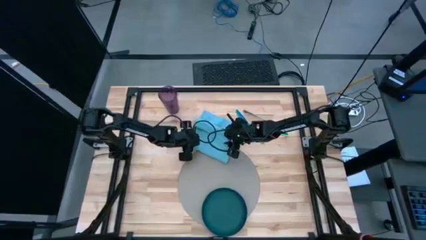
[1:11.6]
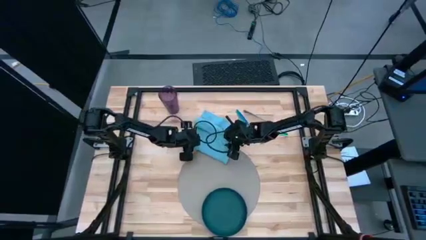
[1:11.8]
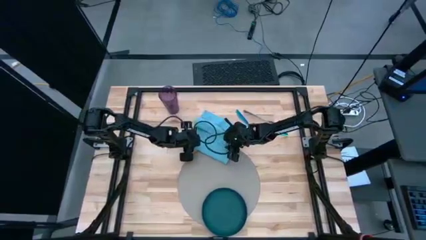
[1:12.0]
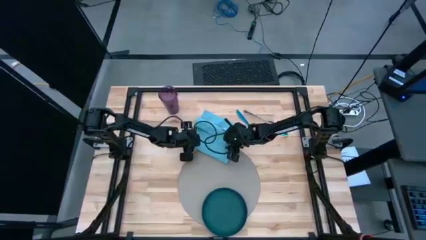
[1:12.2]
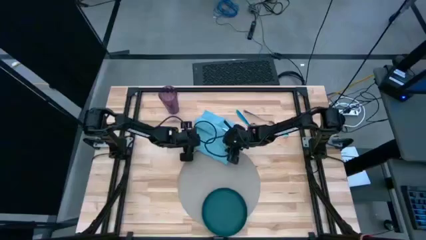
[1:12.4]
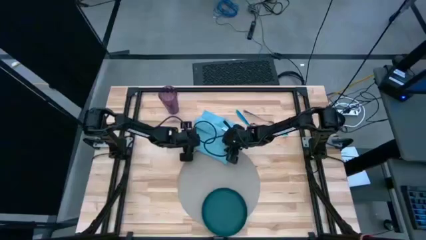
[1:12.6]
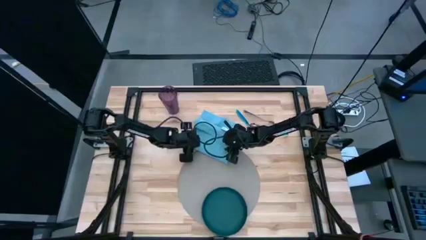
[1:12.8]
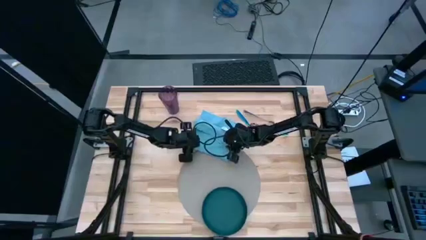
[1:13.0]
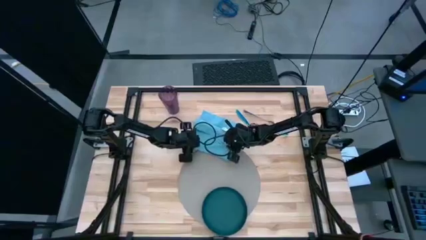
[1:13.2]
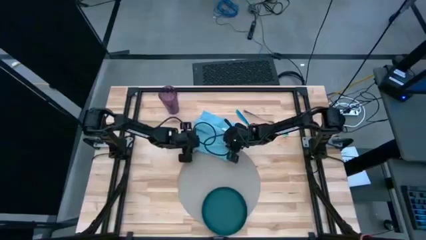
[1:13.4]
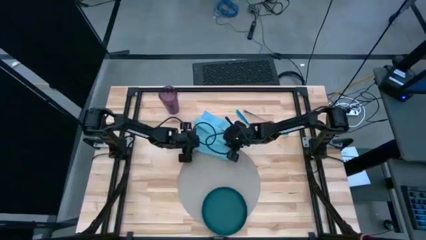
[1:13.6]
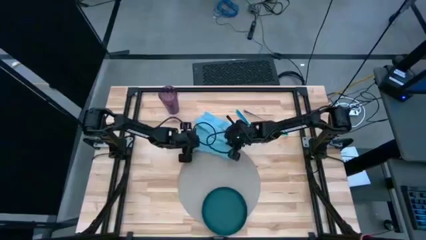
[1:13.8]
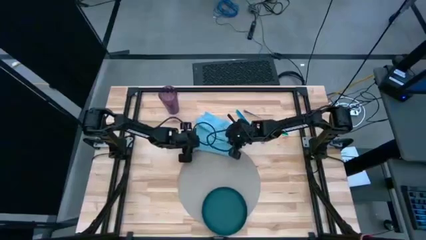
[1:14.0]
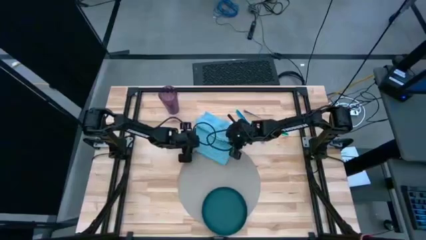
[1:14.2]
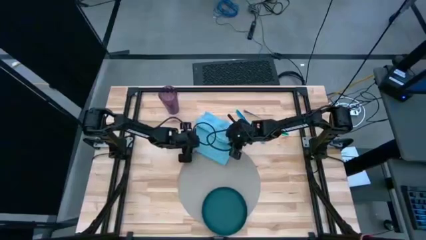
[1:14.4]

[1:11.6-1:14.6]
Task: Set table place
Fold the blue table napkin

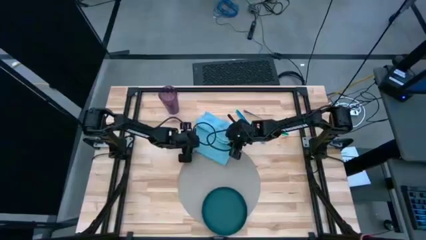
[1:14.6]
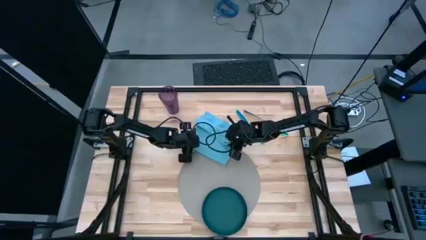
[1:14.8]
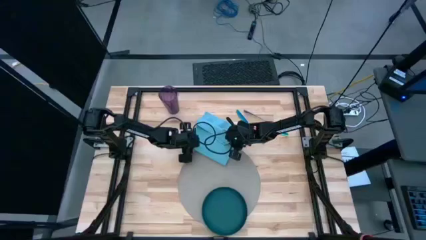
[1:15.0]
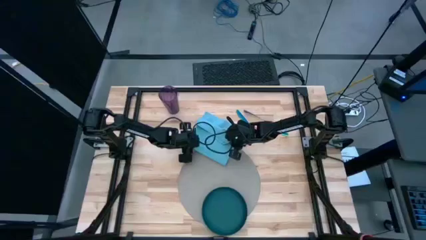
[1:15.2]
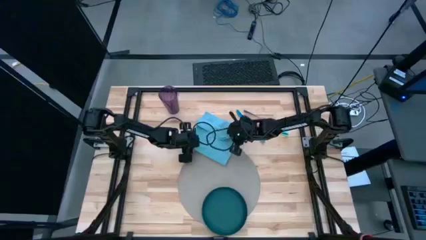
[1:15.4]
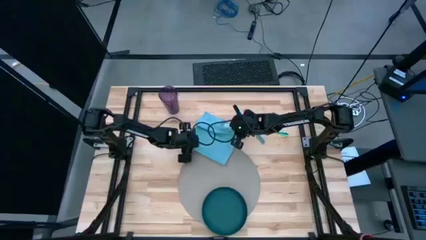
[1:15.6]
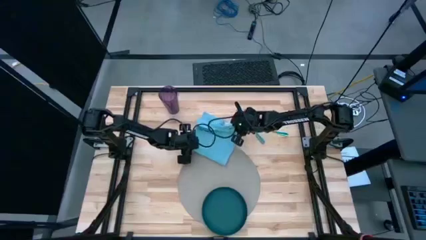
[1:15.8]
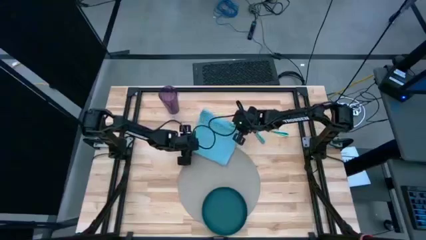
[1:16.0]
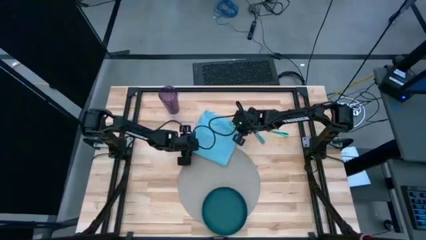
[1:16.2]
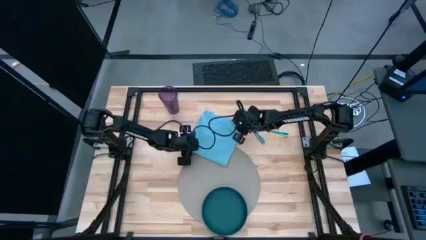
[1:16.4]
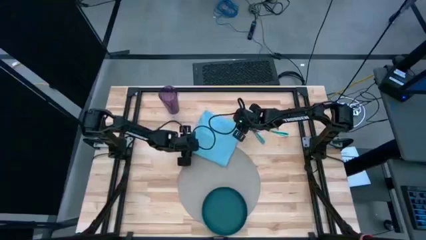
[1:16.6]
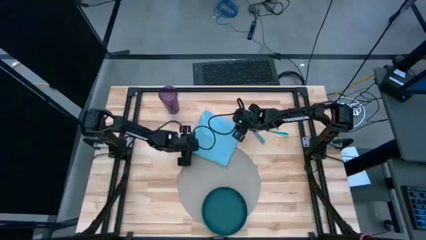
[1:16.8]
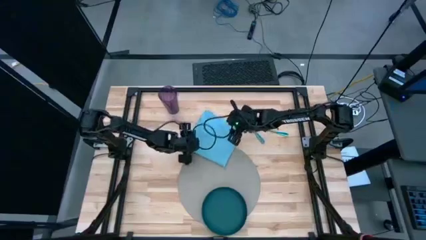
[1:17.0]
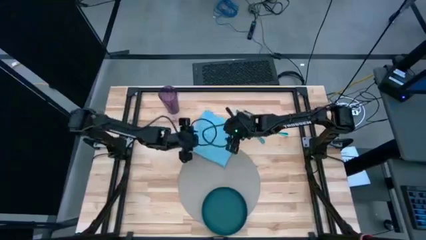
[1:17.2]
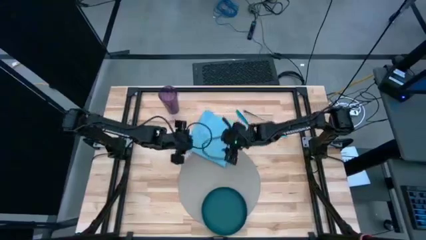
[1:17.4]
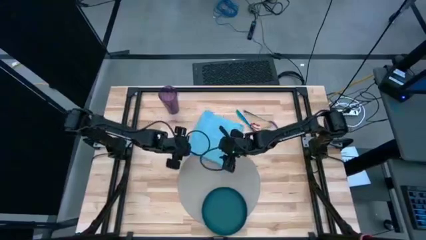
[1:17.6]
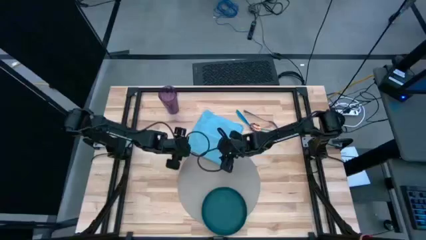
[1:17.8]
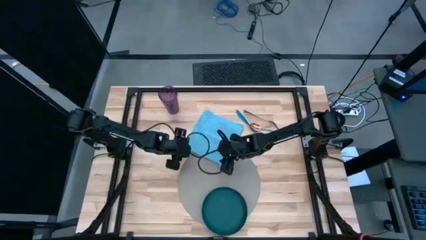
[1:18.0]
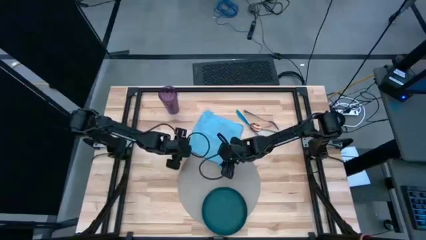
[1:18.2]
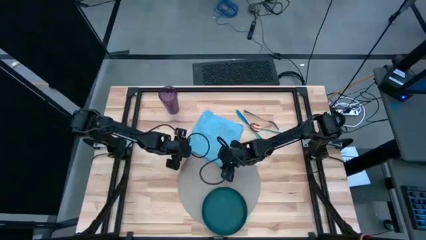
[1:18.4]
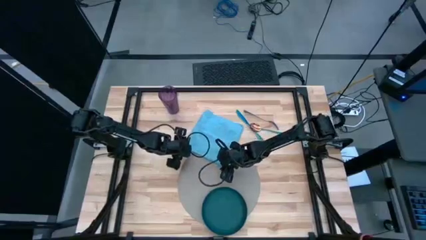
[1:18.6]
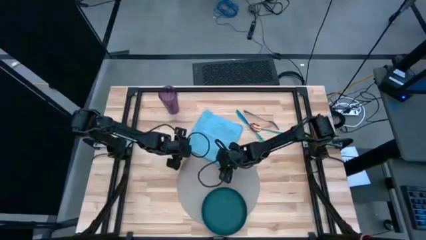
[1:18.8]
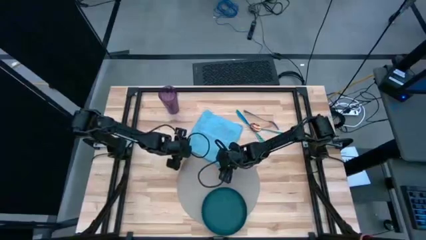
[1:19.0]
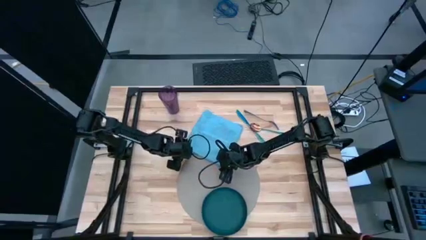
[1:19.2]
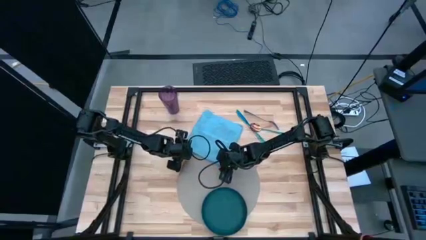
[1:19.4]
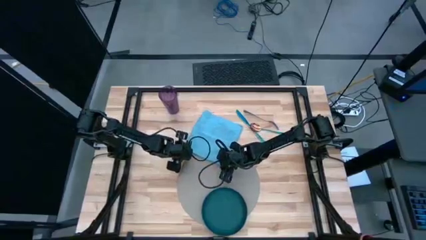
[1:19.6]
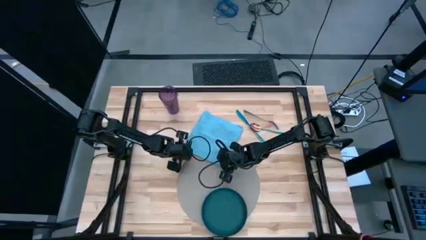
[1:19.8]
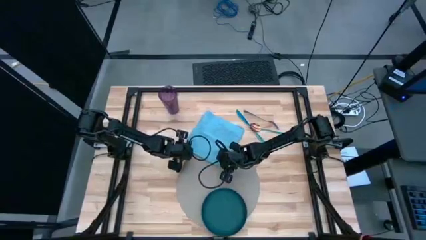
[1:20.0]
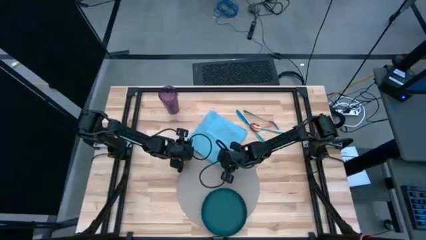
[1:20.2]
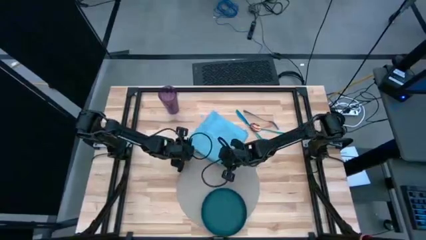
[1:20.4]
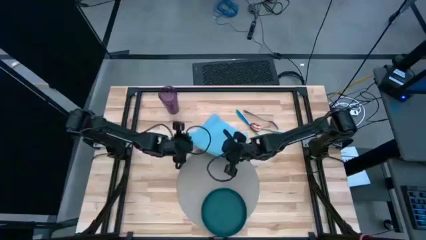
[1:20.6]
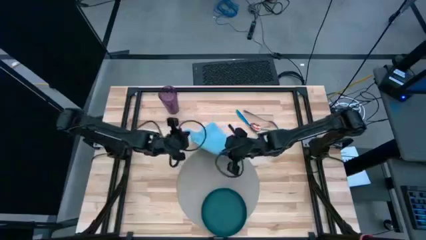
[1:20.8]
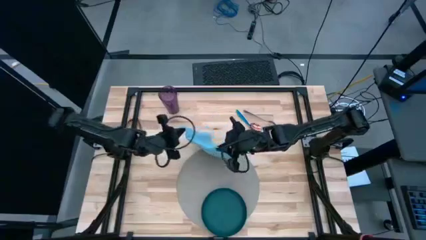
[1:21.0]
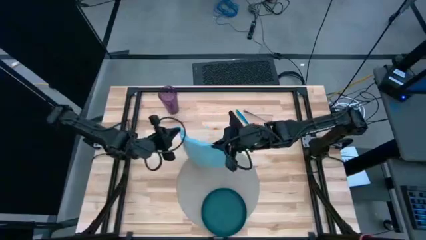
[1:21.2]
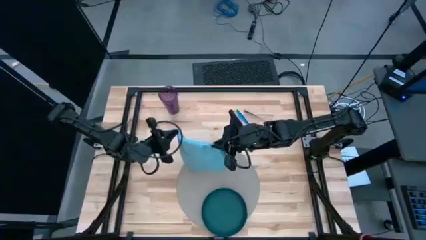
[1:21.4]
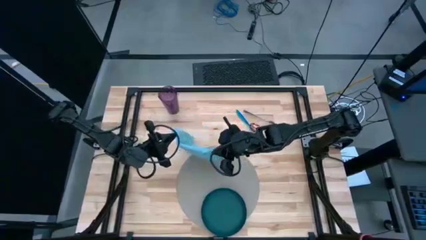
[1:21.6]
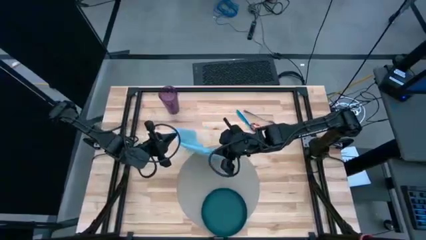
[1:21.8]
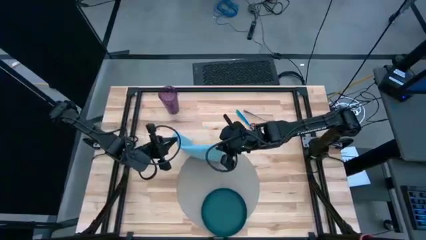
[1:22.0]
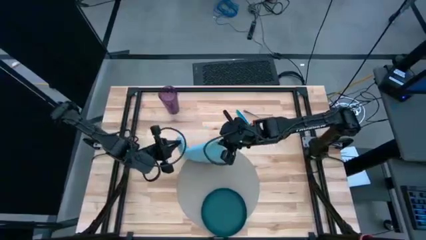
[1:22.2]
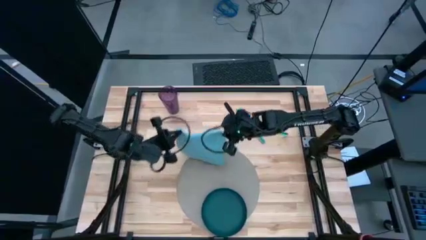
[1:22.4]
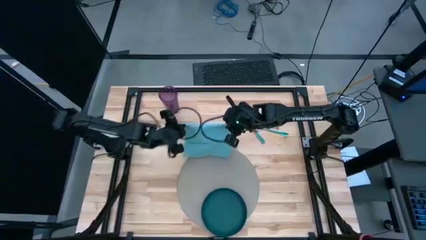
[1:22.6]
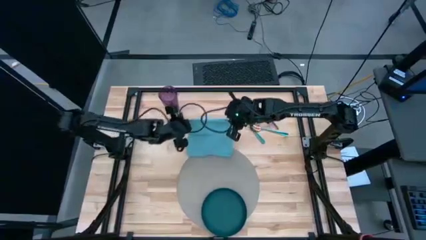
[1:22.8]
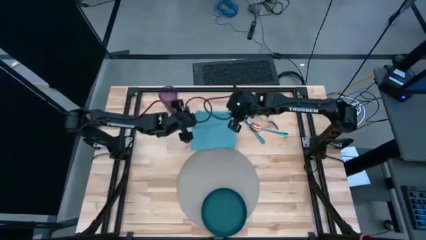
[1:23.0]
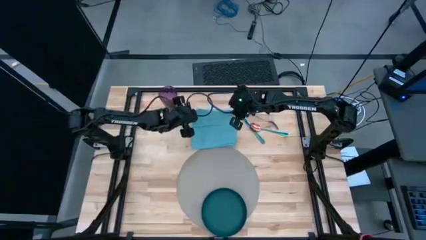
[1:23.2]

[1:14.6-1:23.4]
Fold the blue table napkin

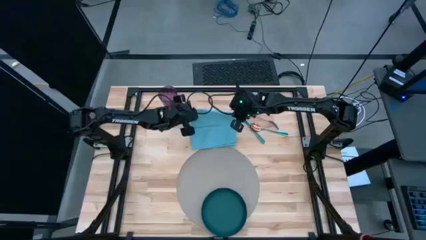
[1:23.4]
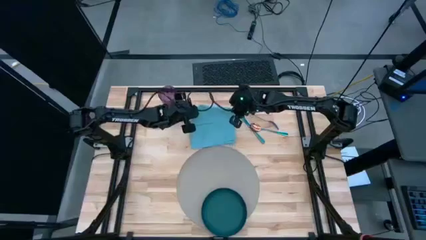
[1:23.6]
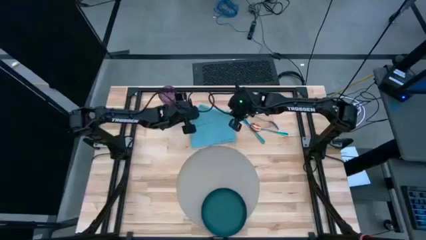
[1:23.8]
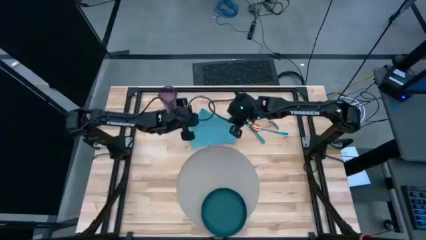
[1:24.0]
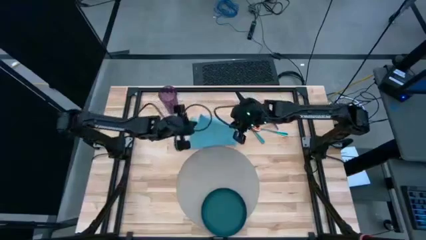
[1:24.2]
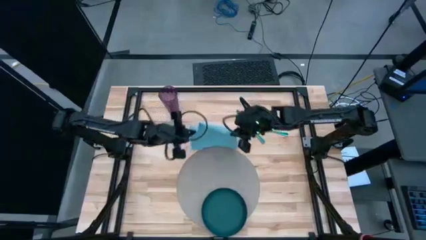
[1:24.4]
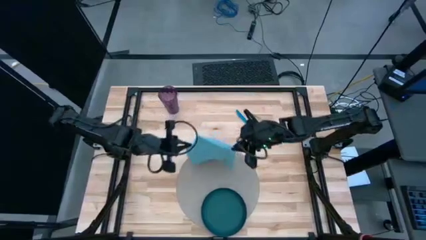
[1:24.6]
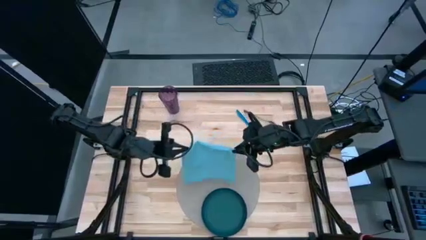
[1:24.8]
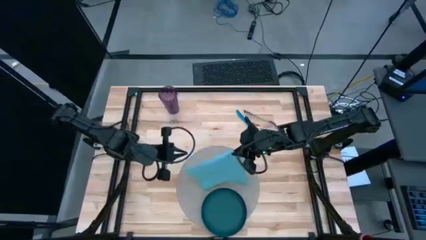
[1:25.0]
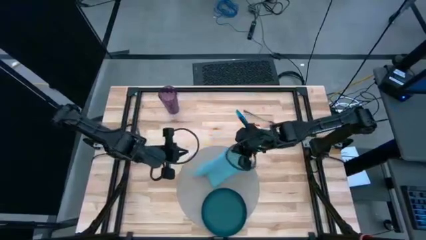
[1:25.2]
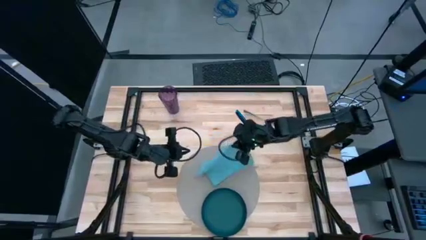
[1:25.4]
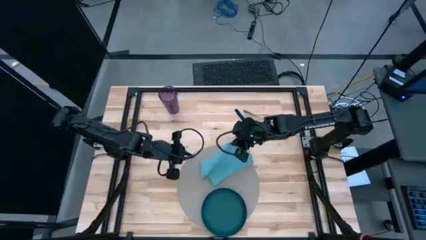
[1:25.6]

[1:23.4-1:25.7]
Fold the blue table napkin

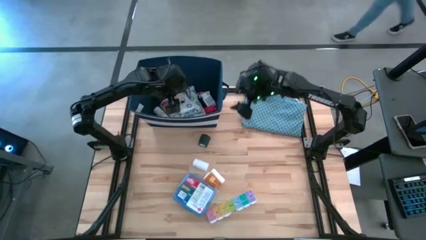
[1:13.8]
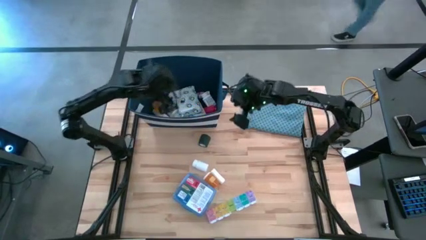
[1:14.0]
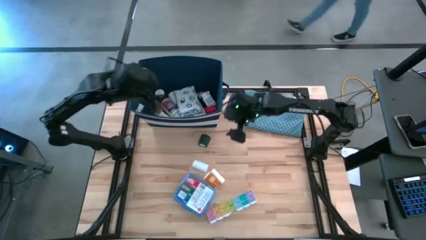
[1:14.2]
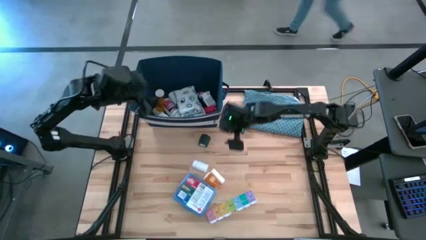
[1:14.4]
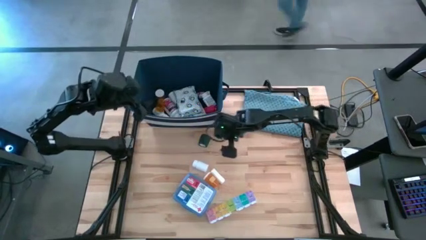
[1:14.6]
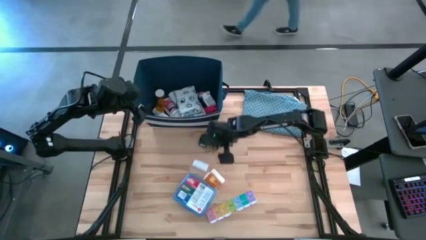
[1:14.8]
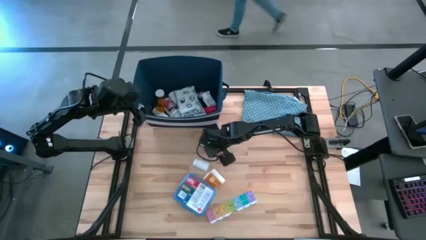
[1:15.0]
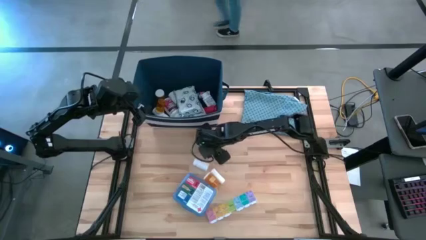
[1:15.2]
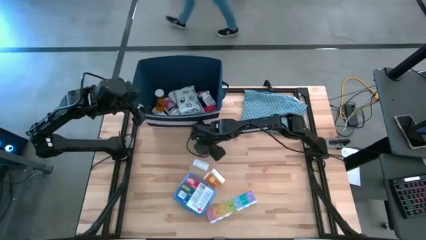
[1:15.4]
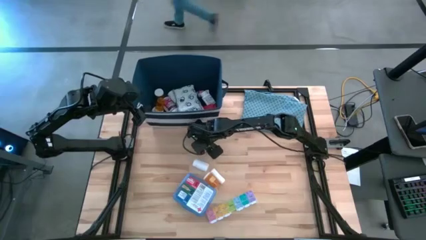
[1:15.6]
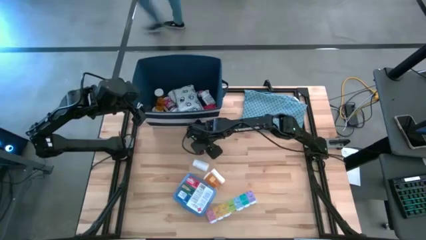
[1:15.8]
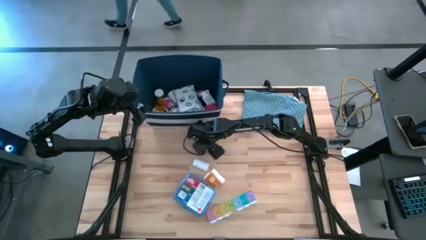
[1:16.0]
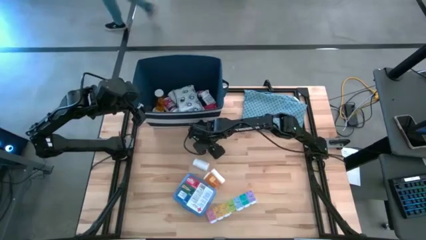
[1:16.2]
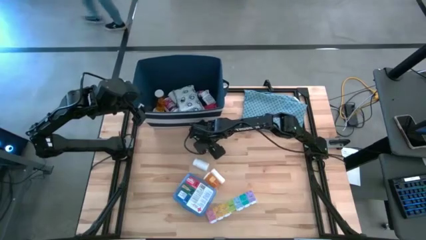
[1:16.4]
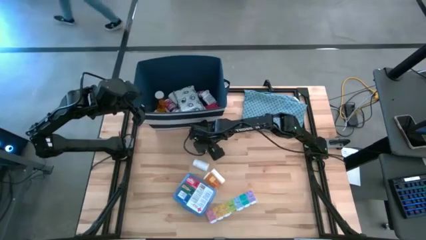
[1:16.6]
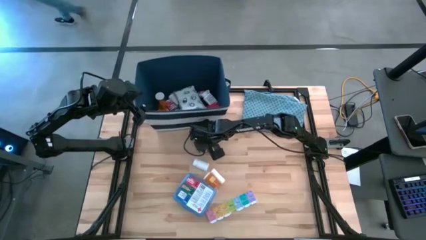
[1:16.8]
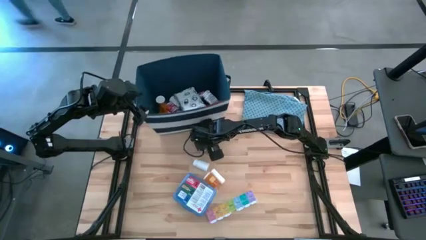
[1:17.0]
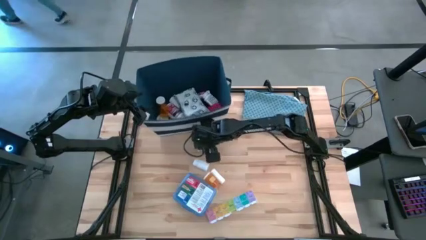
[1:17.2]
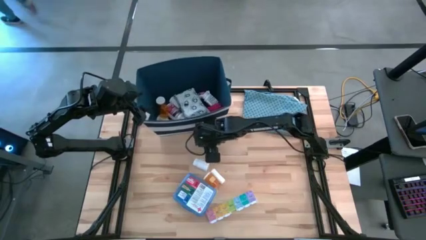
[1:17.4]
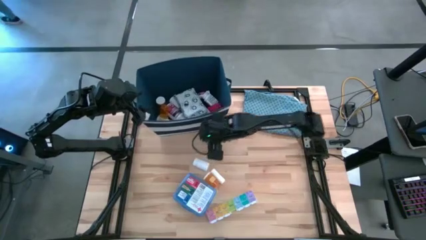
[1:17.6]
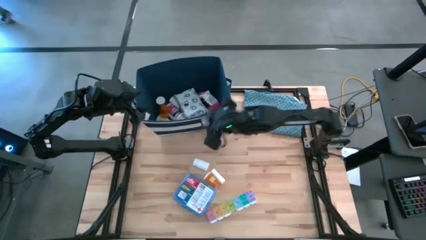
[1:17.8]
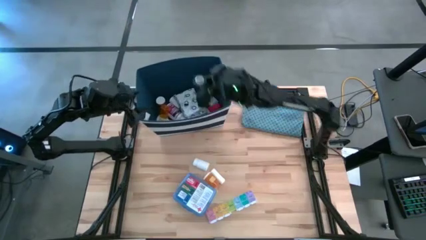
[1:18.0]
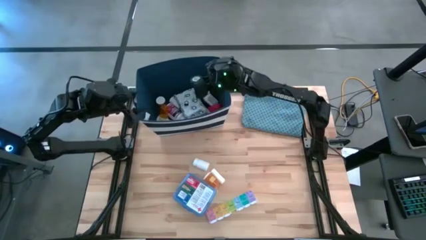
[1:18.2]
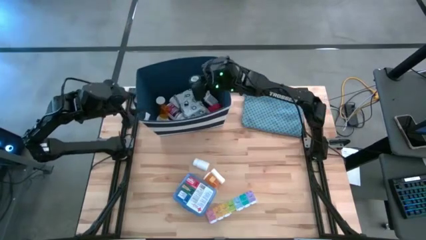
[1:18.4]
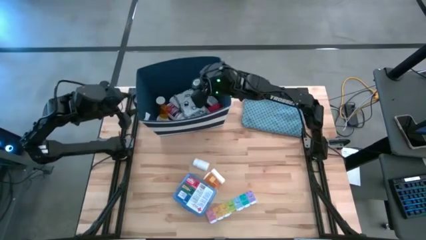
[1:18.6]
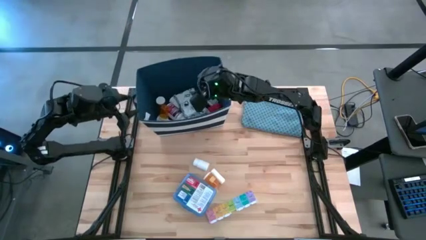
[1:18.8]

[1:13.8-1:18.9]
Task: Pick & place medical supplies in basket/bin
Put the black bandage into the blue bin
